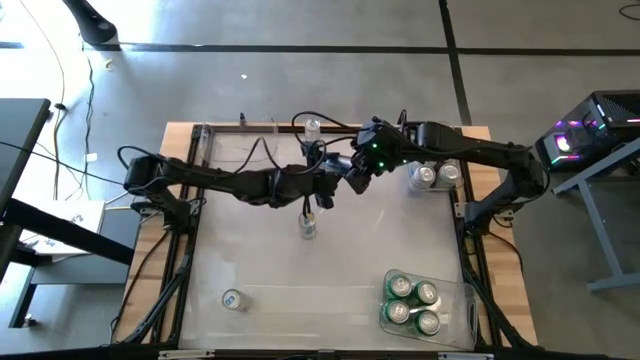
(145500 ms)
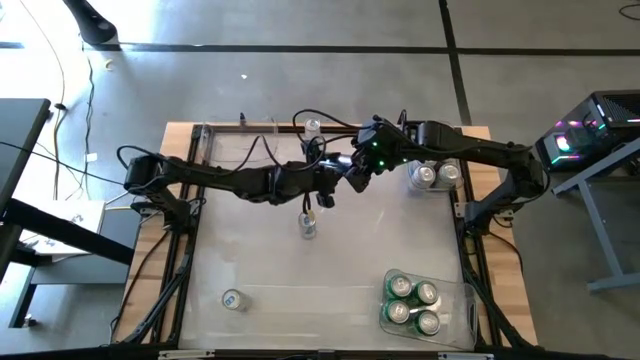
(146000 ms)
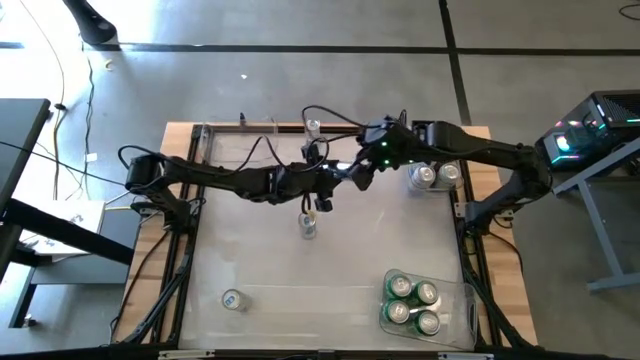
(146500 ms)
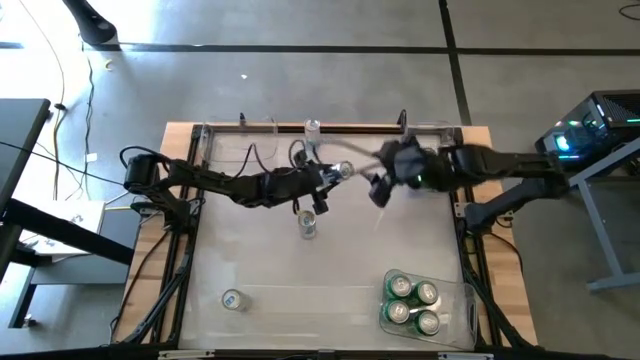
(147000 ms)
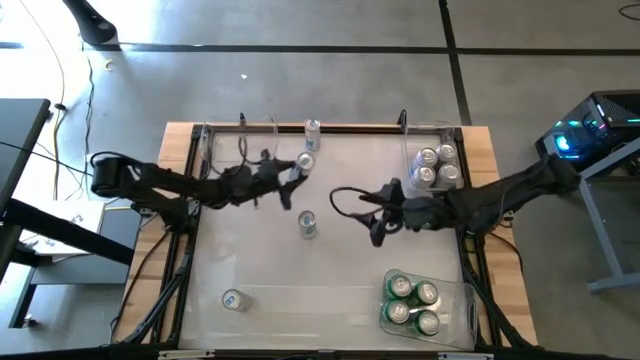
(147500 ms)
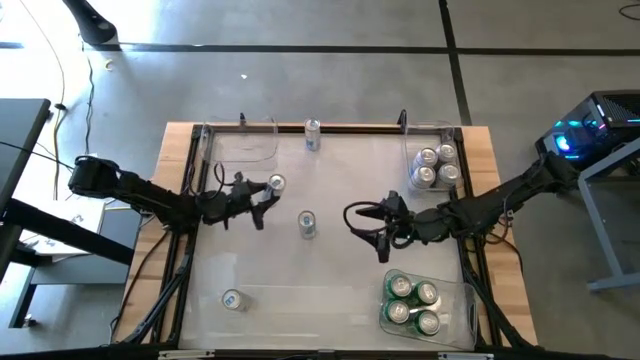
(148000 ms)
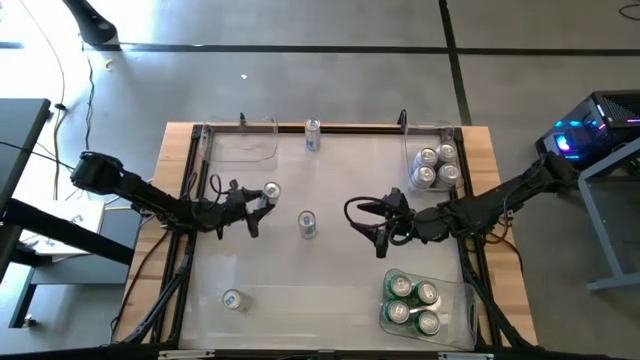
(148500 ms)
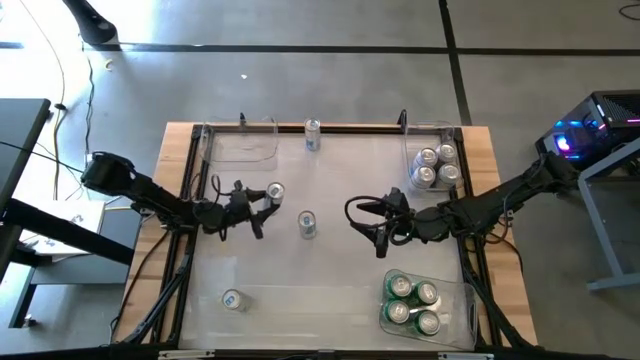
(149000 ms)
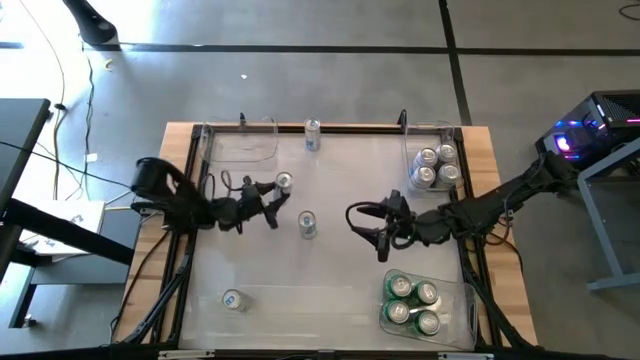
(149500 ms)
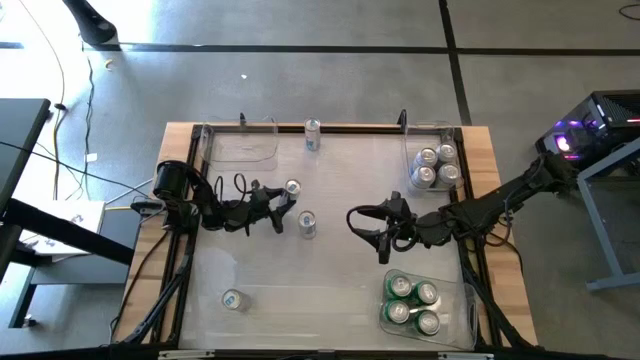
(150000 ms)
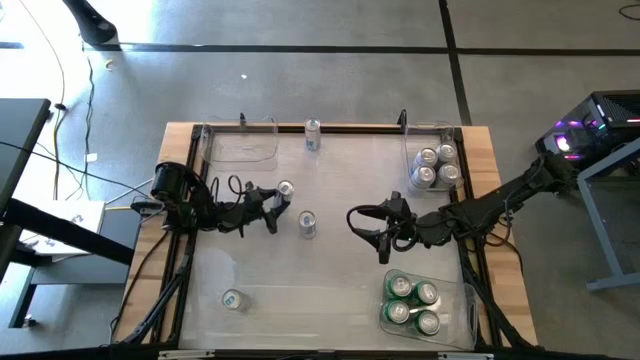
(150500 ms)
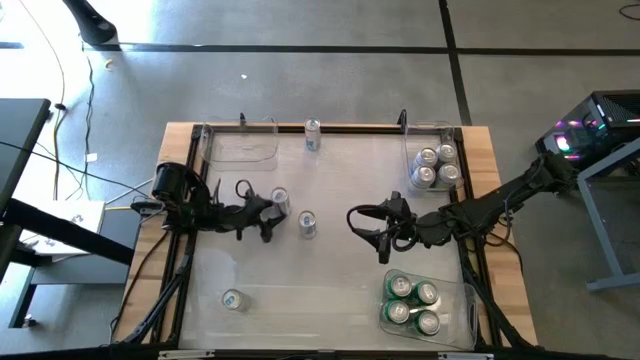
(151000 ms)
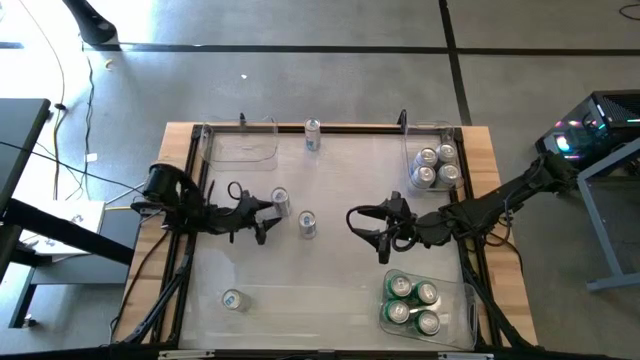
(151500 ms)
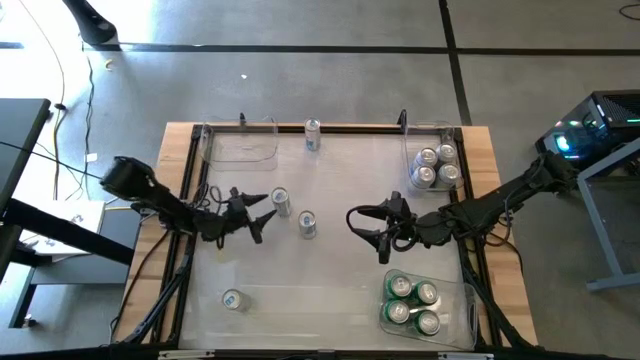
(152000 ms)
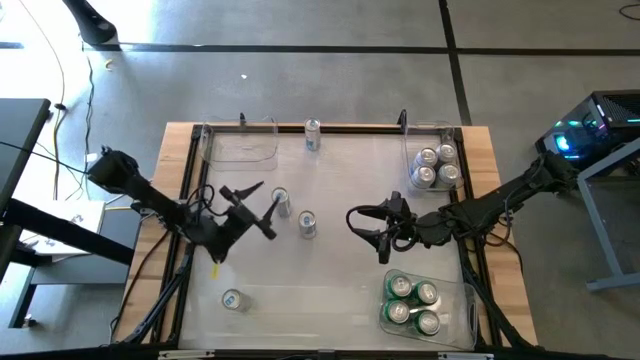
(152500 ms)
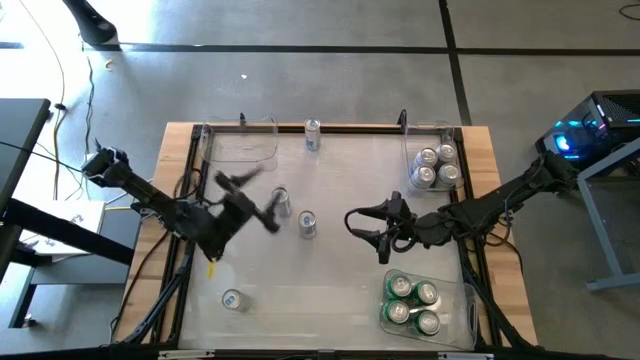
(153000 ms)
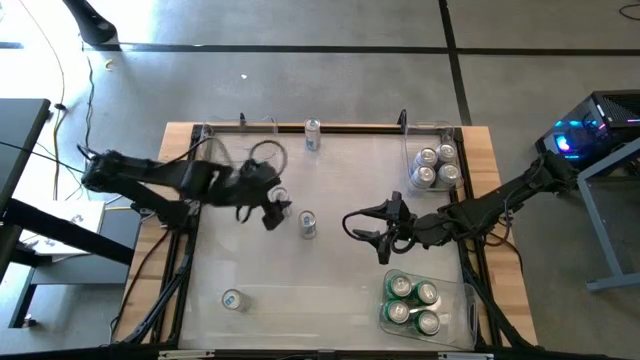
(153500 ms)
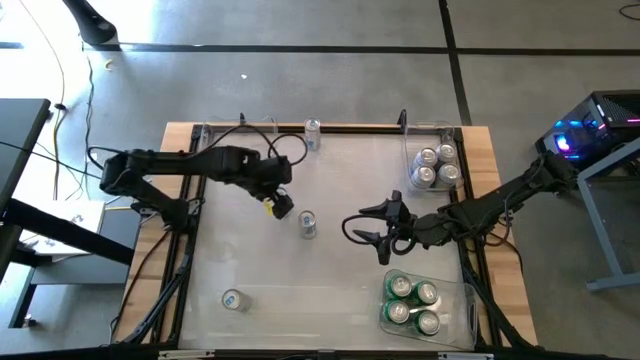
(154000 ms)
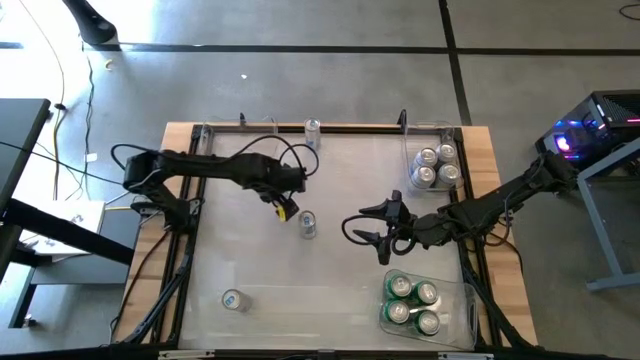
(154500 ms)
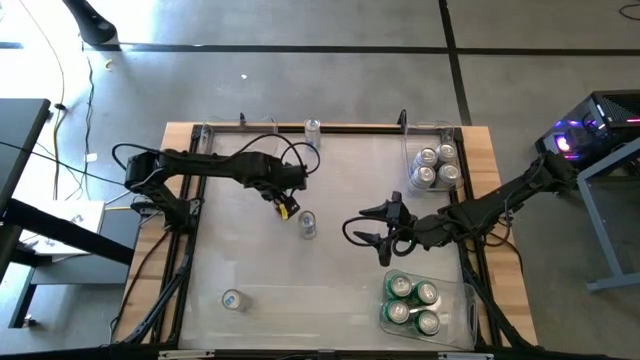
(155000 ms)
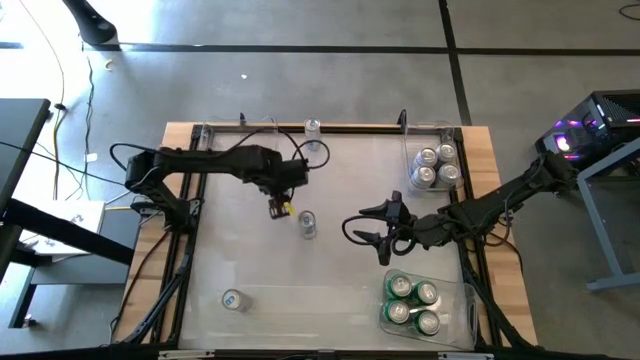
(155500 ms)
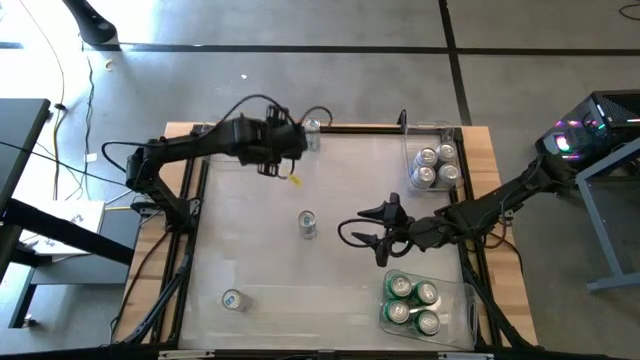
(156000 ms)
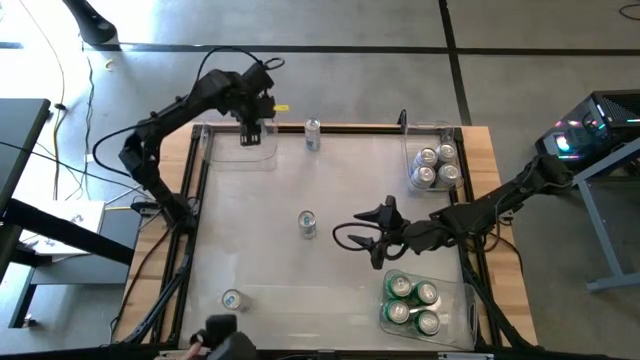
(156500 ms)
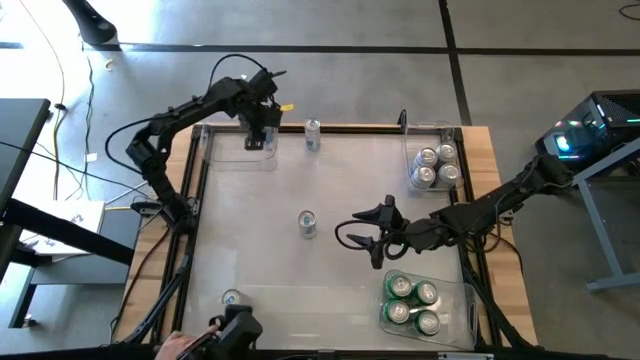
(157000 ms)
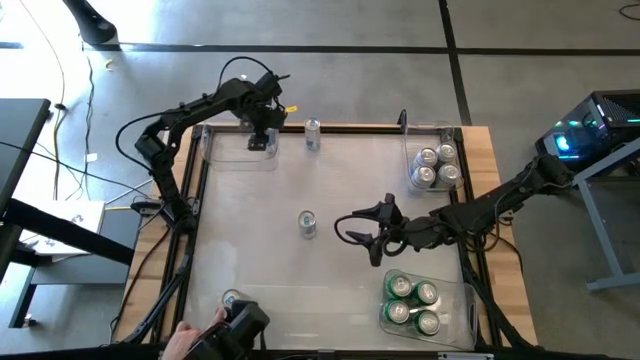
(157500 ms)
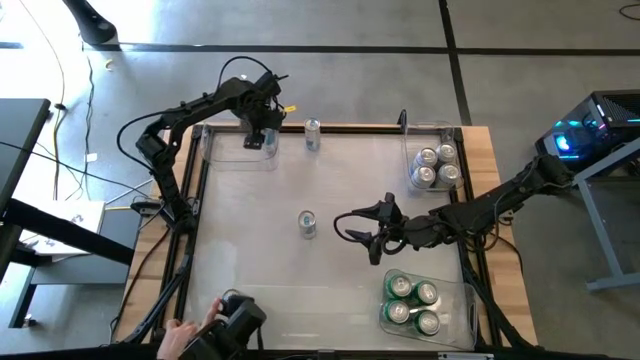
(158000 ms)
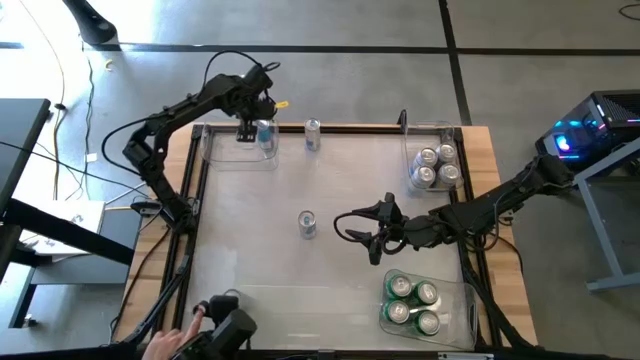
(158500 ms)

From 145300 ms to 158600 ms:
Task: Sort soda cans
Put the top left white blue soda can into the top left transparent bin

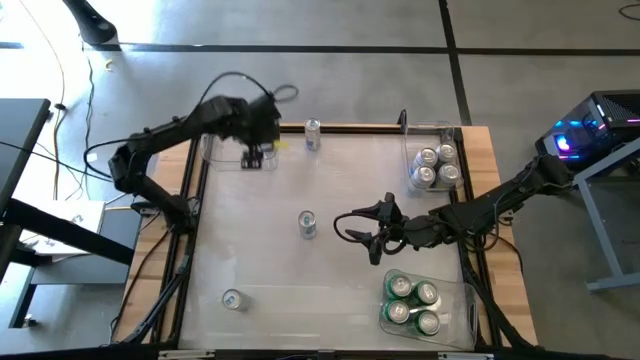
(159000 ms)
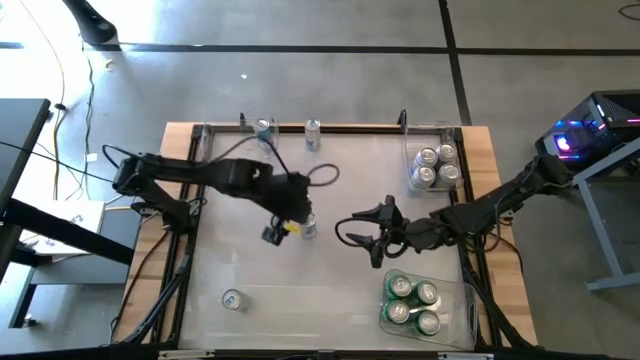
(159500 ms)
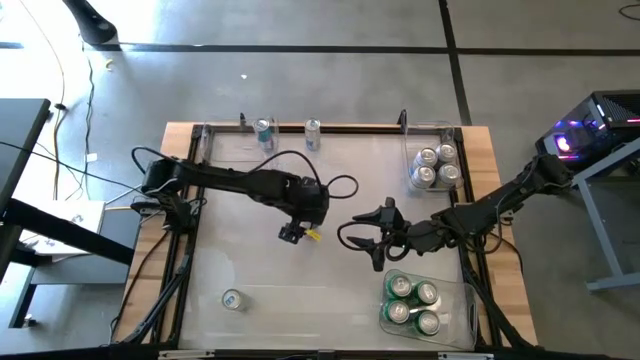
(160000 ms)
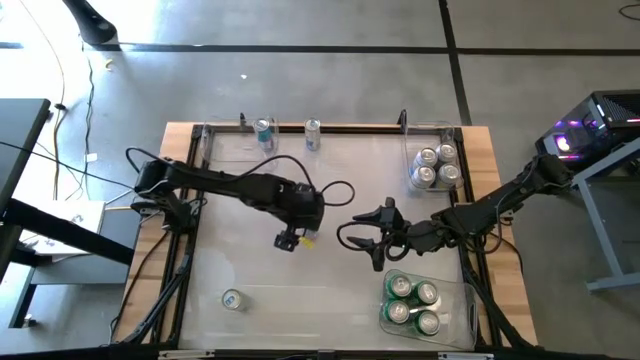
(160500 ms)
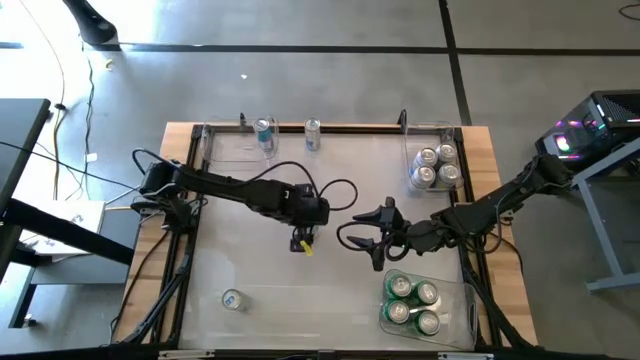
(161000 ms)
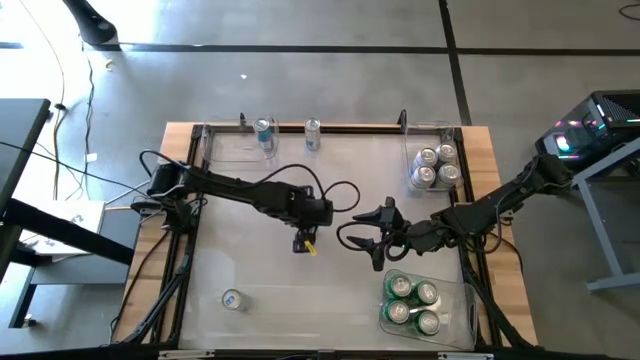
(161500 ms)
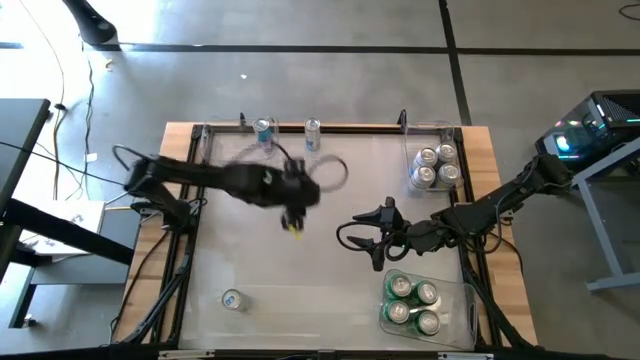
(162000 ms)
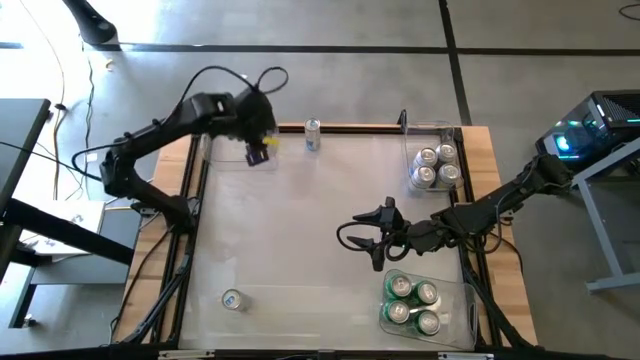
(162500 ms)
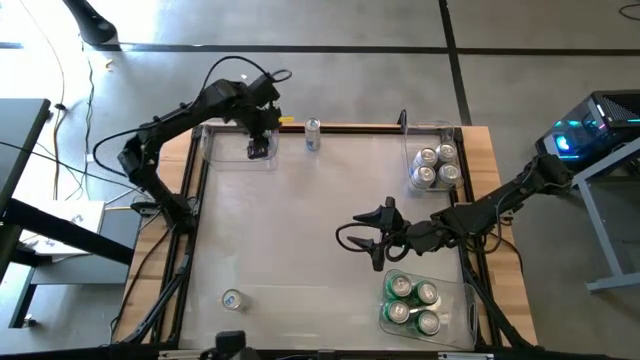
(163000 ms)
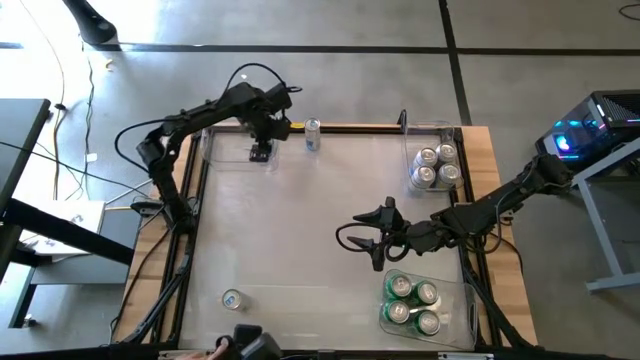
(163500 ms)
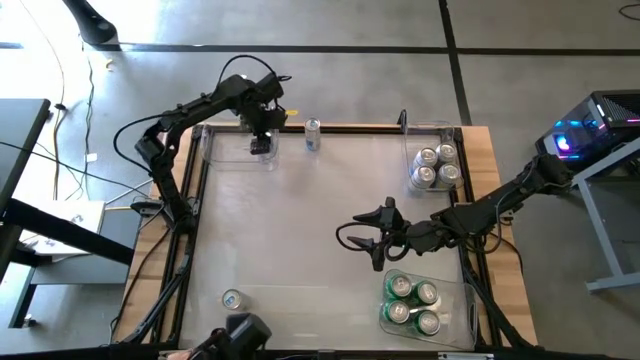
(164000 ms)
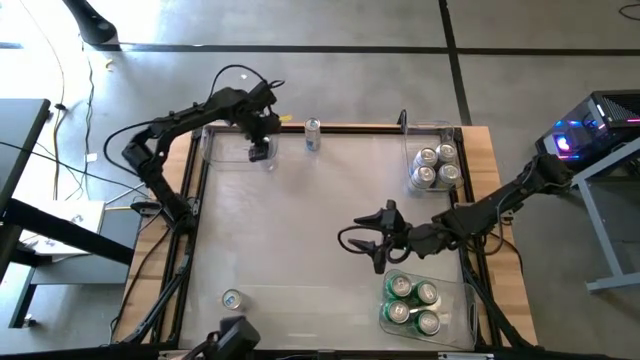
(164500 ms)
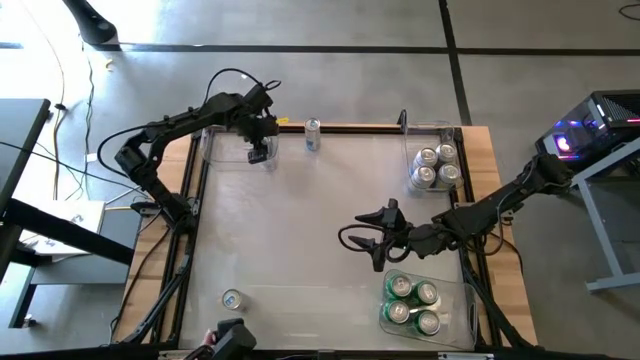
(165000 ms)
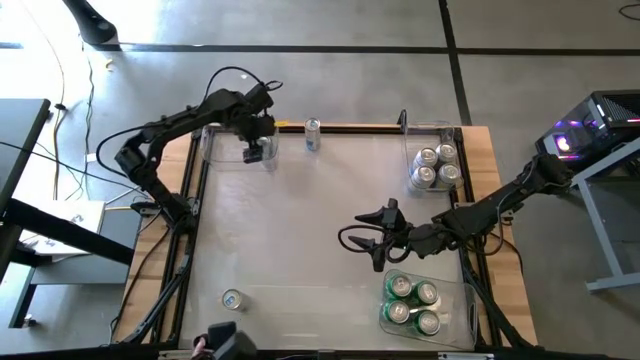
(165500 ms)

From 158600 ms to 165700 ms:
Put the center white blue can into the top left transparent bin

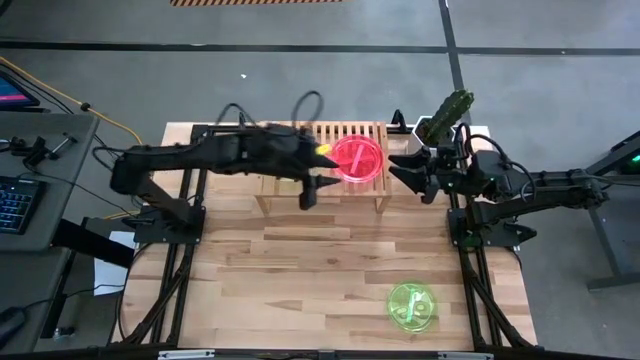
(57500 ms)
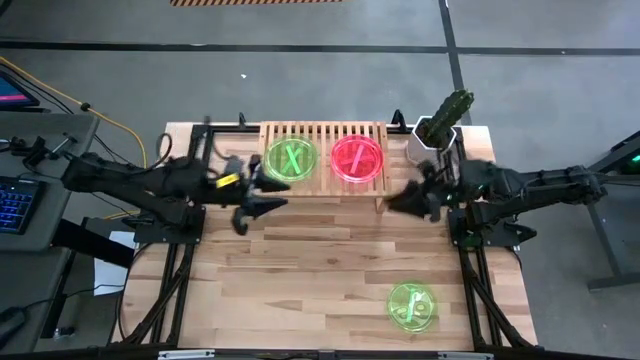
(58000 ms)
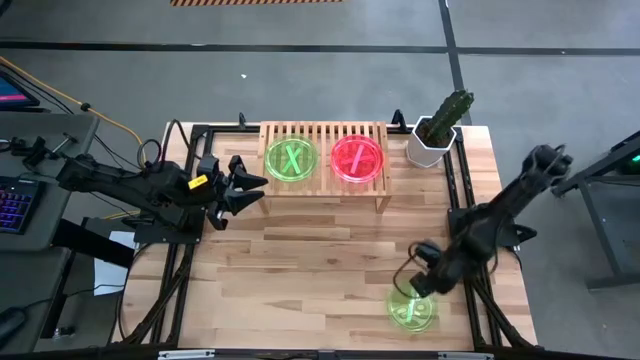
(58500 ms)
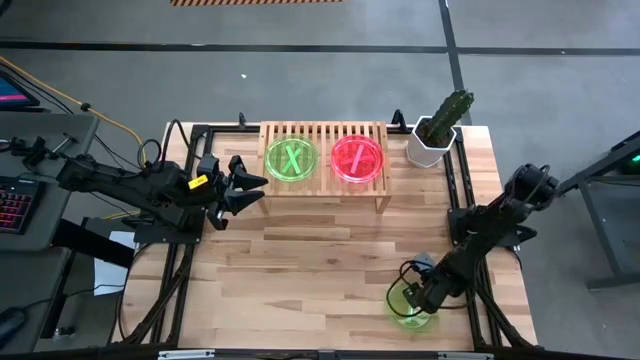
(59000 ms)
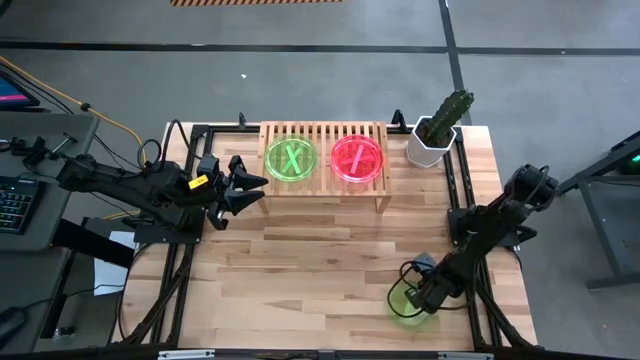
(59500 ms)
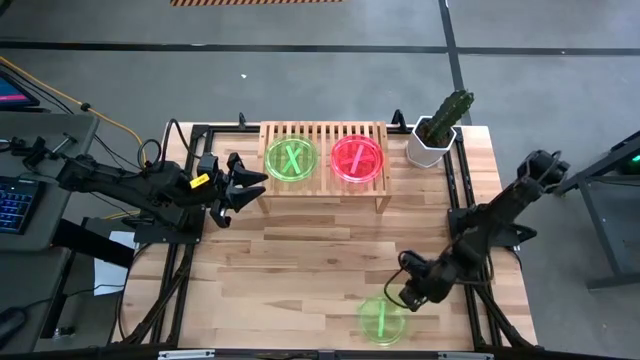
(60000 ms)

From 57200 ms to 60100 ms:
Task: Place and stack plates onto a shelf
Stack the green transparent plate on top of the stacked green transparent plates
